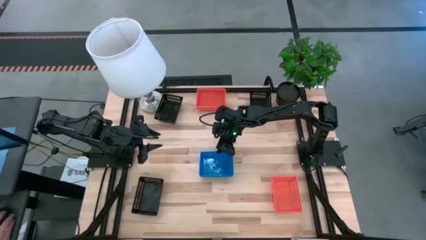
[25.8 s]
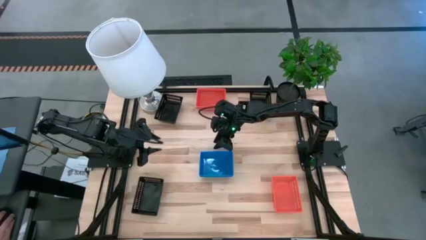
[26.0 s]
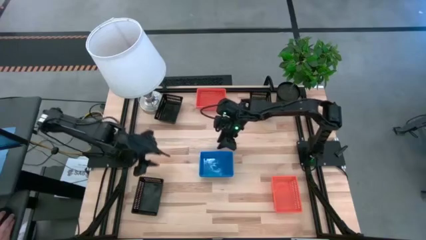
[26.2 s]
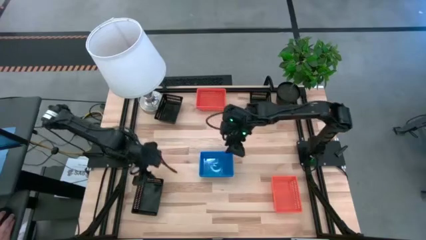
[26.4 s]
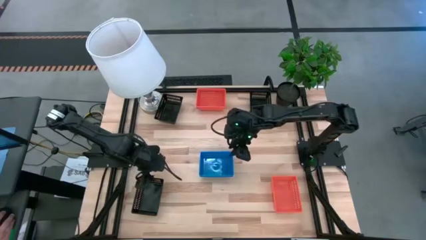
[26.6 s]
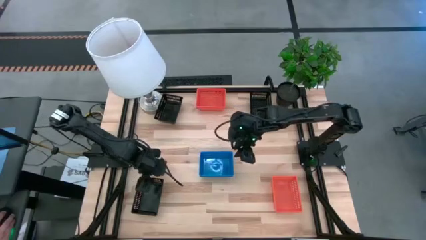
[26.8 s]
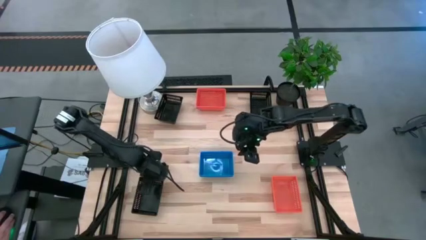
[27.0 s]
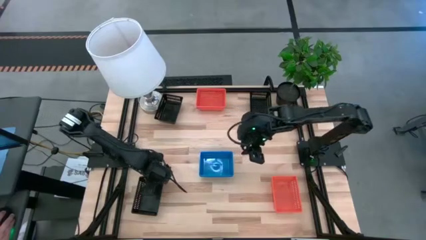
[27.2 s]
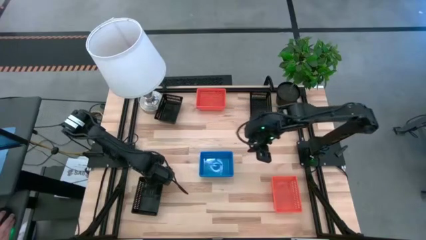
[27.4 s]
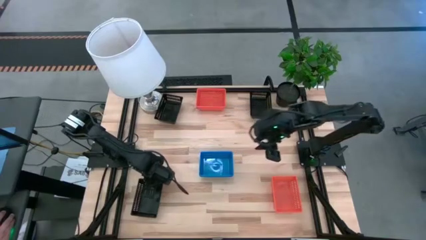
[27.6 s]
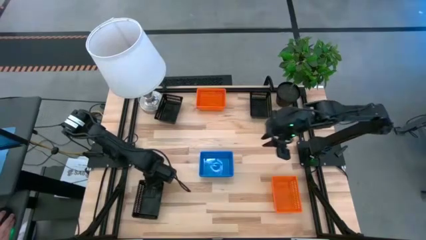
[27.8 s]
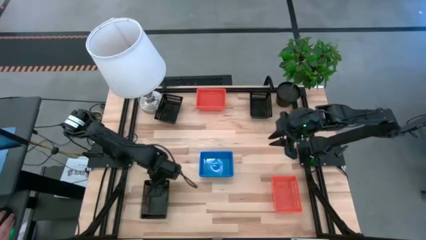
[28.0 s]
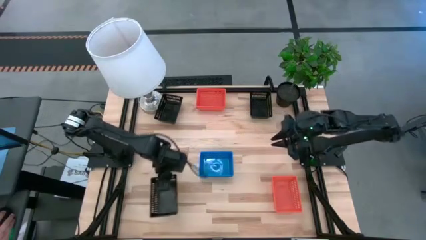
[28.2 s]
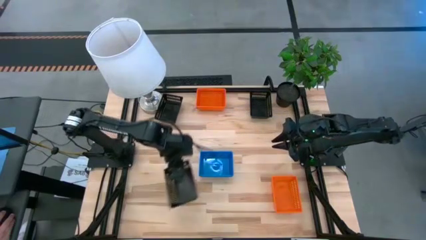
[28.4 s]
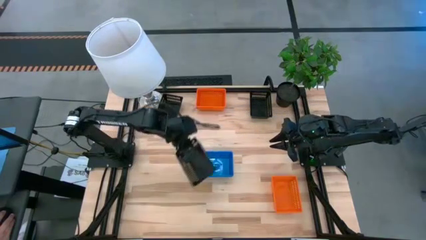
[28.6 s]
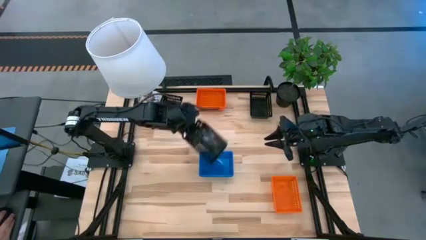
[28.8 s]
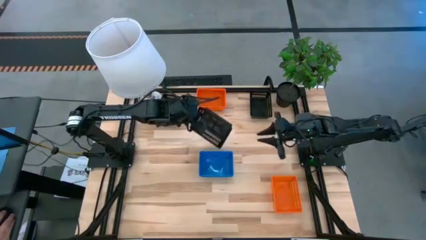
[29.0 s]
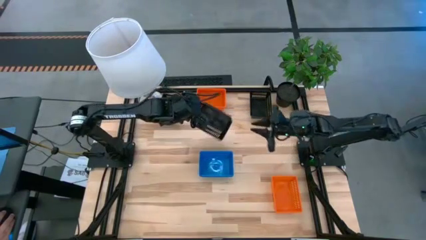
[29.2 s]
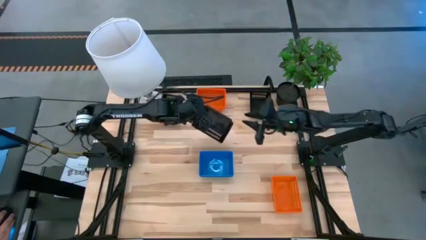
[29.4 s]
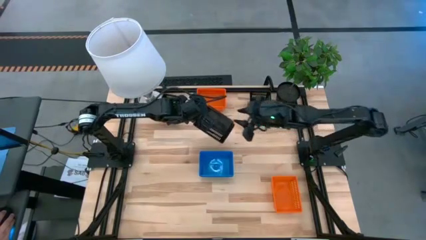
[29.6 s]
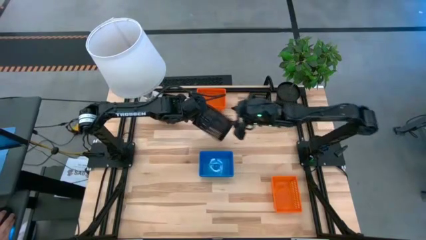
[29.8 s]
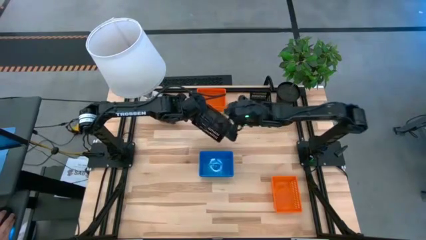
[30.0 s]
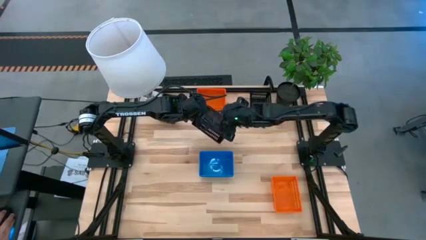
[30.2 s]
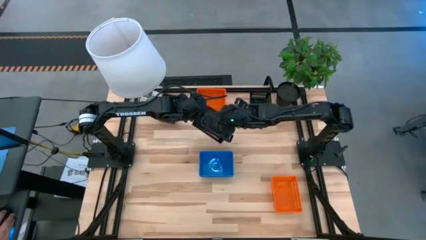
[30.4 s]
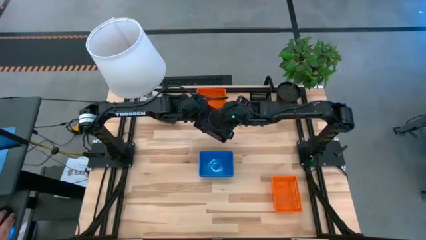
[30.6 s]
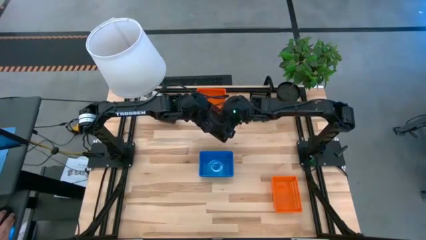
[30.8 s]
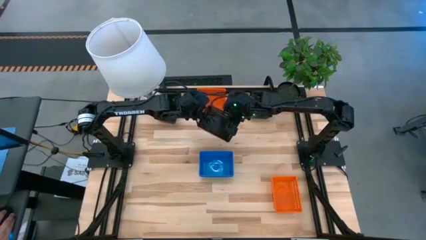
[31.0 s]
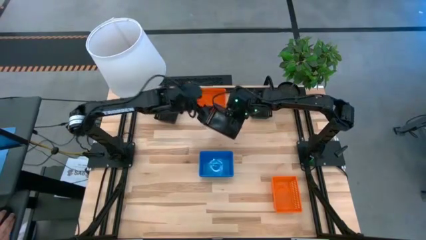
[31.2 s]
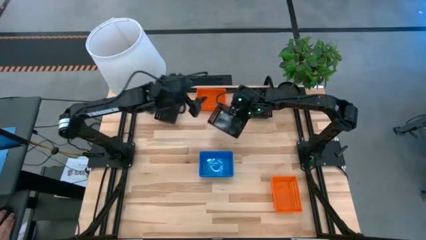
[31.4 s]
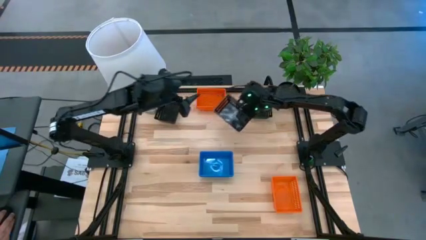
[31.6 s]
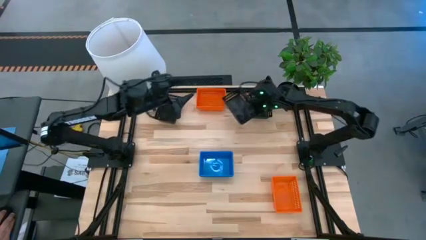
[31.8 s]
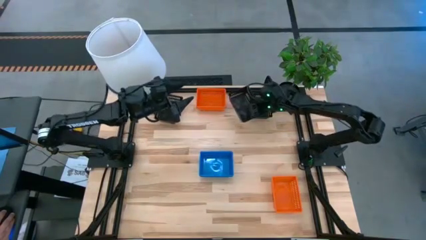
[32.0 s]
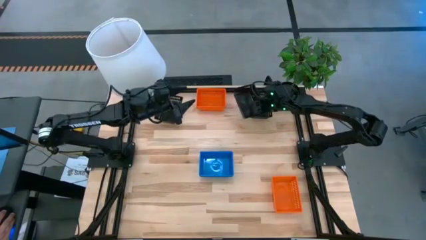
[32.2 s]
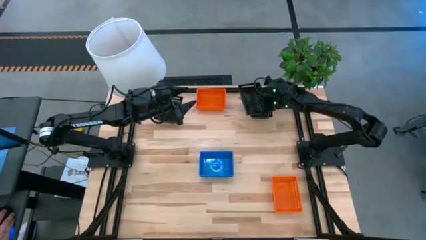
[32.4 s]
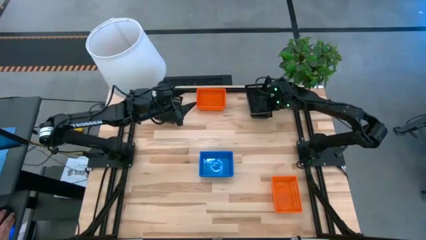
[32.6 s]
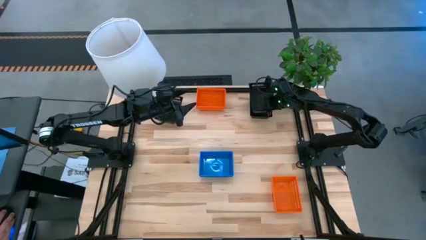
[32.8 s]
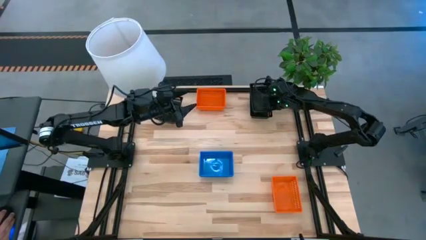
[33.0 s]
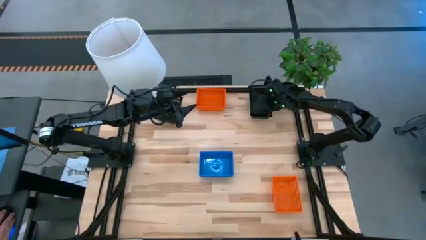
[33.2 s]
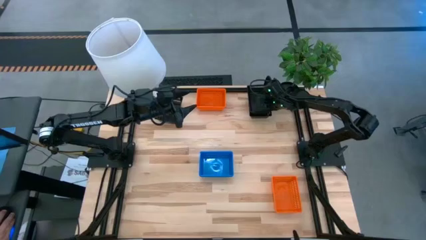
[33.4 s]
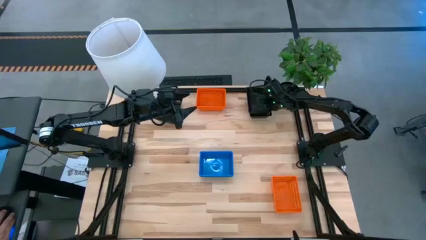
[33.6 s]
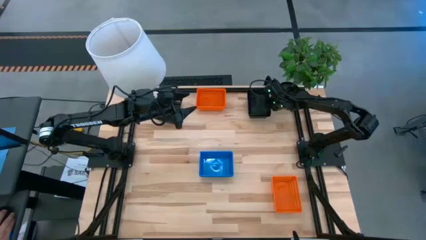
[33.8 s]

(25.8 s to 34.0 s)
Stack the bottom left black bin on the top right black bin

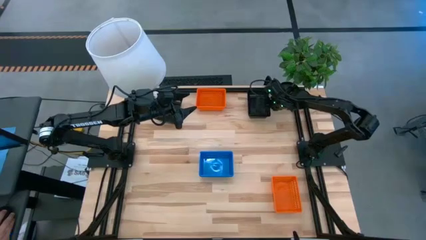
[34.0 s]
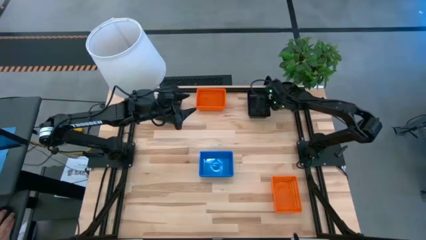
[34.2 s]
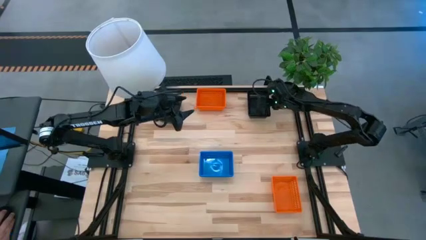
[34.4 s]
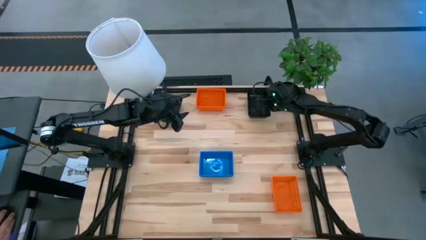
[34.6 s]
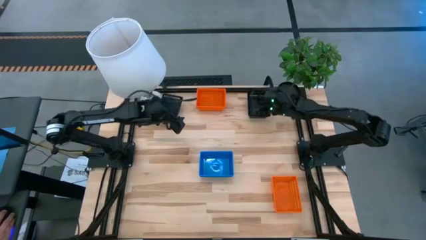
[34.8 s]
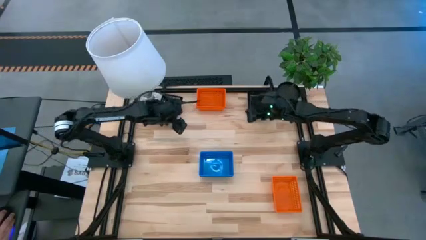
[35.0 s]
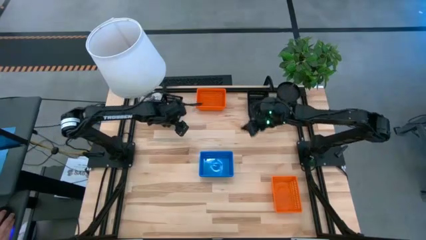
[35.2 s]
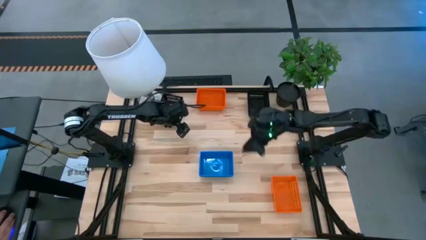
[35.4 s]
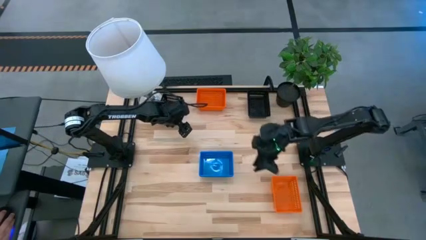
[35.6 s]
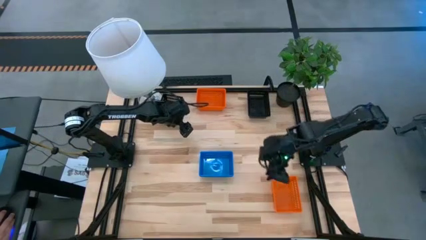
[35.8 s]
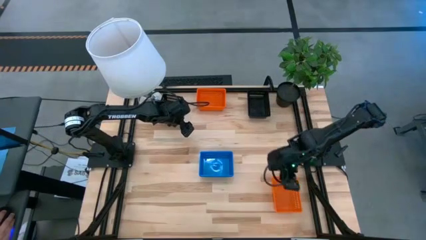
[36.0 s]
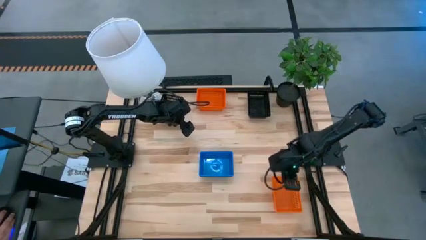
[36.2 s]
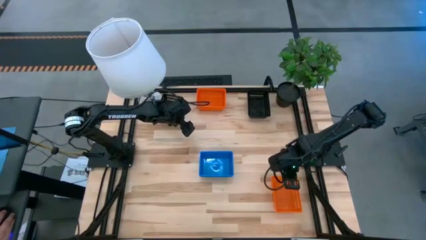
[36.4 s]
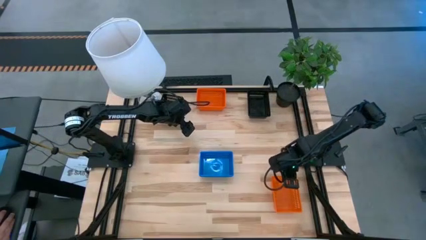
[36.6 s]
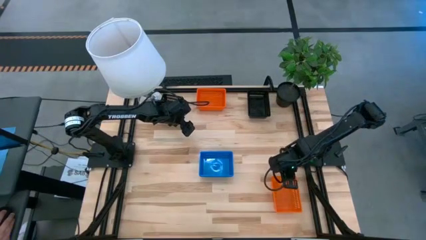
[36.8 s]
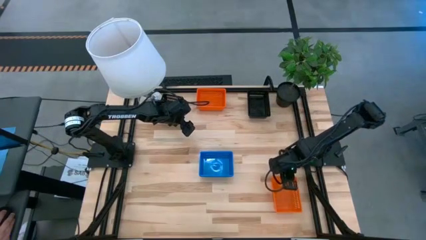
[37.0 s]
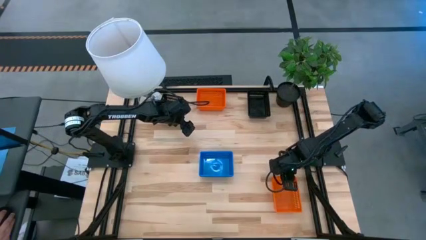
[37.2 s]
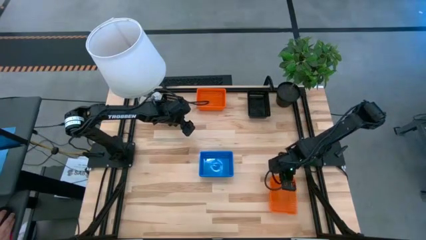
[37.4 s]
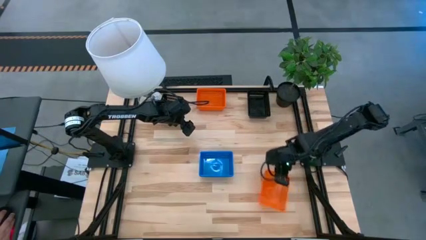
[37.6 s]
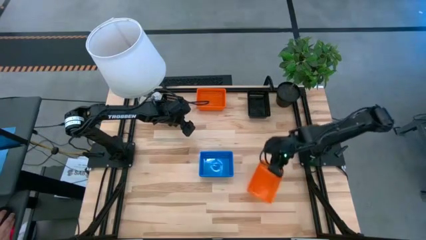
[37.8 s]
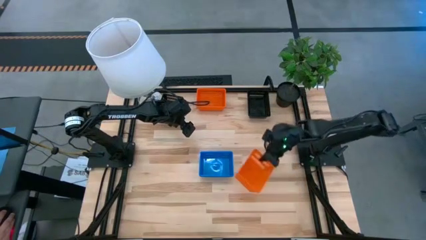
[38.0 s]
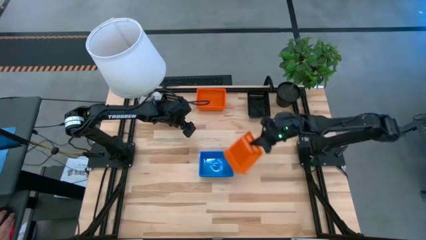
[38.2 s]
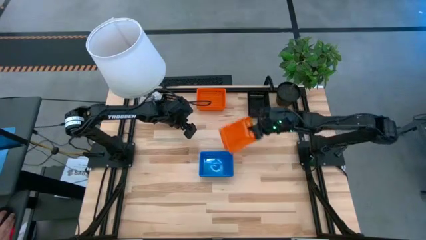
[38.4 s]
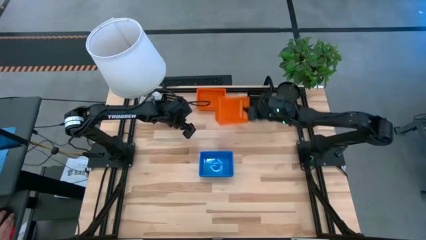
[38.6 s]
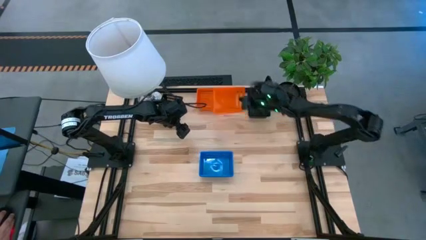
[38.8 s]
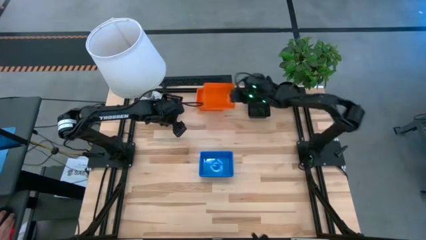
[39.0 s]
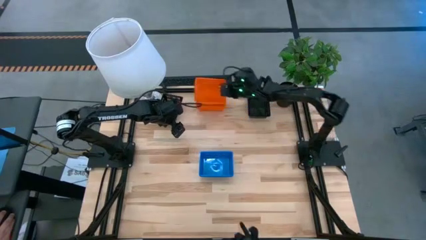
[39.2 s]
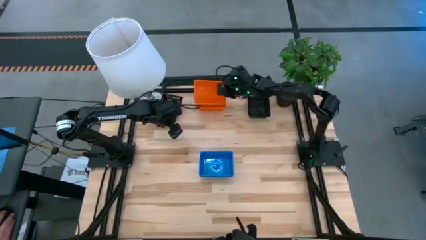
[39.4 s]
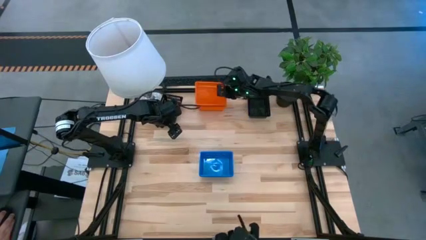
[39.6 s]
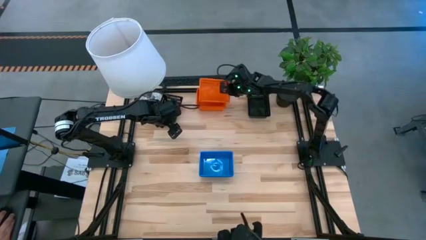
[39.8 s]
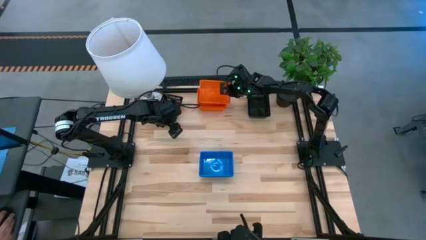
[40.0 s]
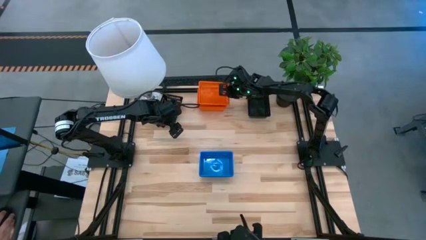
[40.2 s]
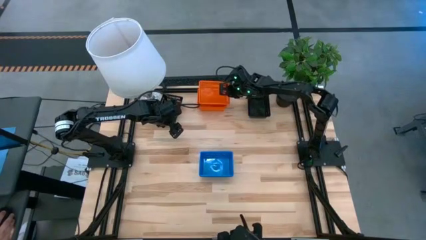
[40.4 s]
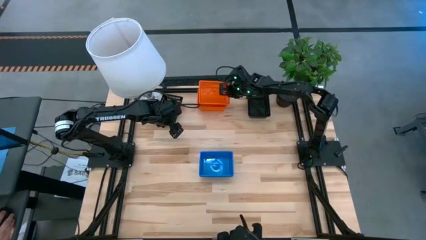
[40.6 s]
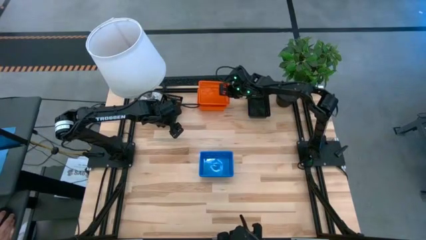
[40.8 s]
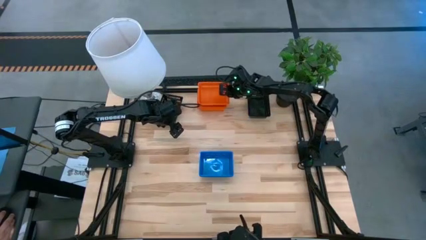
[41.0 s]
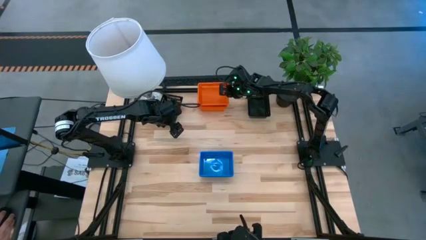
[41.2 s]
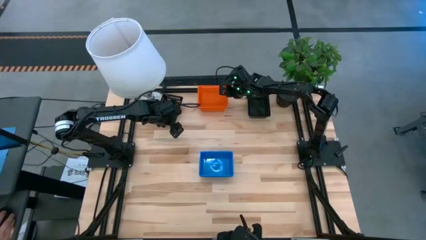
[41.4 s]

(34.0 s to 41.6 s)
Stack the bottom orange bin on the top orange bins
